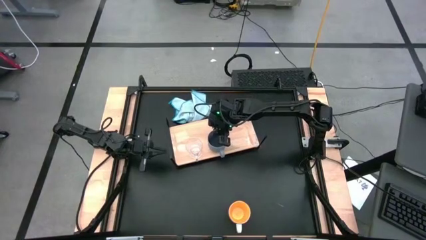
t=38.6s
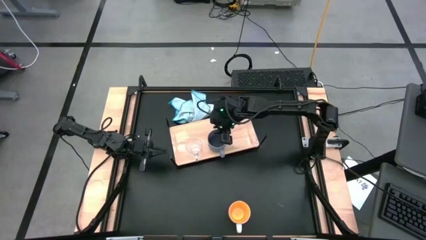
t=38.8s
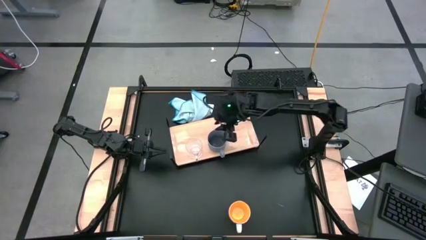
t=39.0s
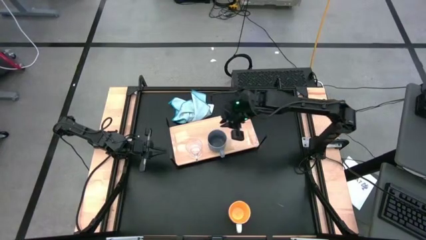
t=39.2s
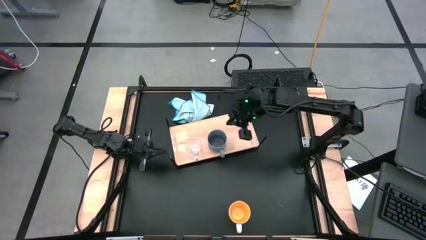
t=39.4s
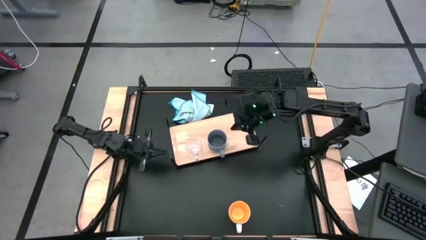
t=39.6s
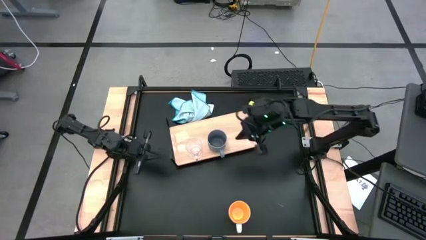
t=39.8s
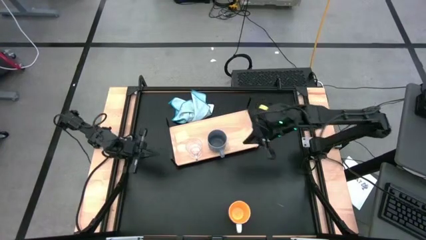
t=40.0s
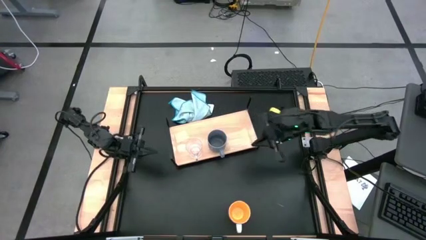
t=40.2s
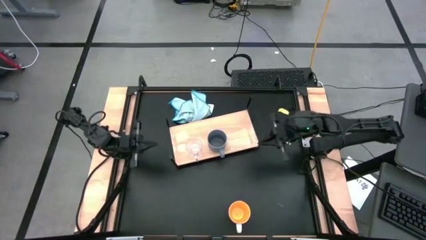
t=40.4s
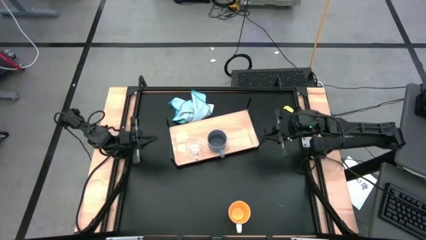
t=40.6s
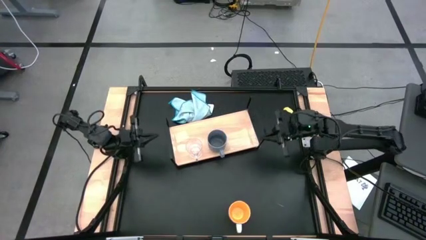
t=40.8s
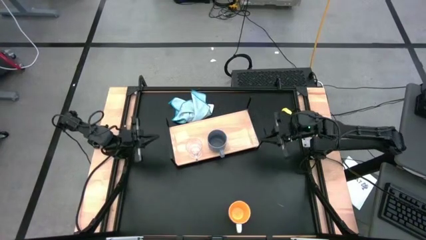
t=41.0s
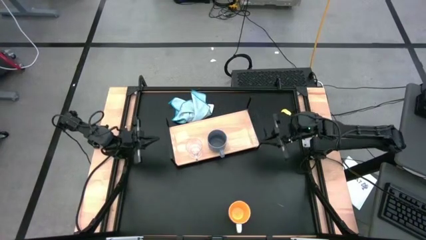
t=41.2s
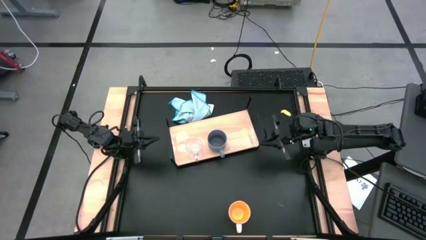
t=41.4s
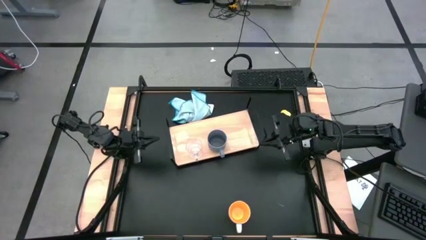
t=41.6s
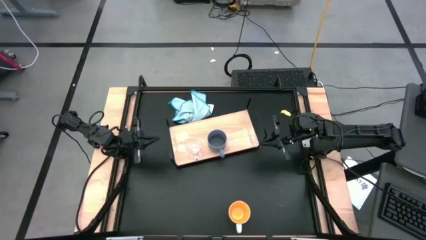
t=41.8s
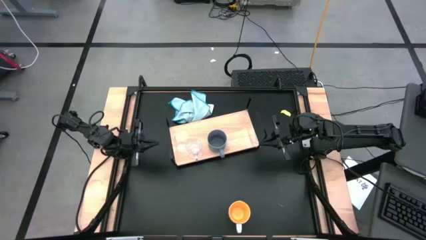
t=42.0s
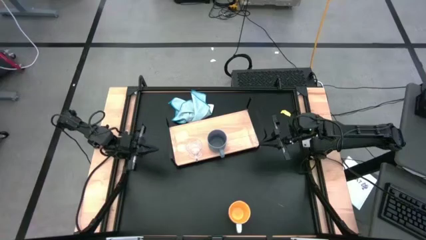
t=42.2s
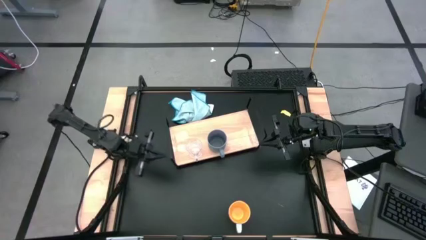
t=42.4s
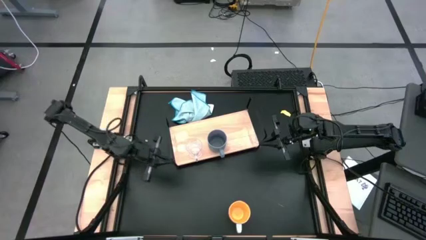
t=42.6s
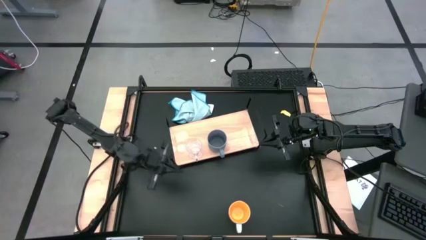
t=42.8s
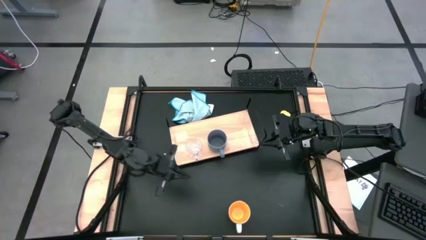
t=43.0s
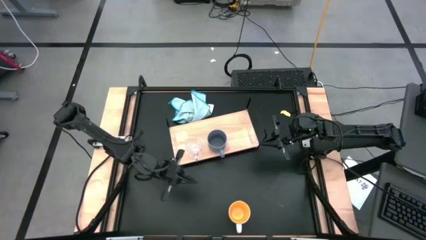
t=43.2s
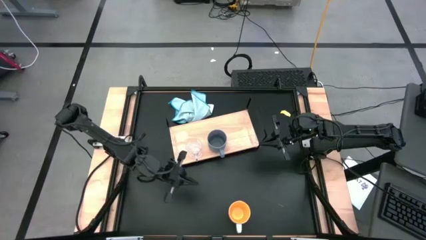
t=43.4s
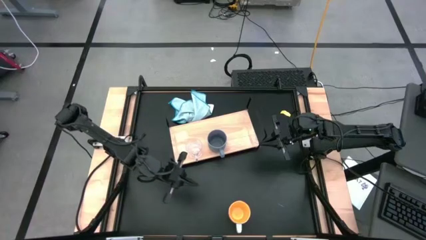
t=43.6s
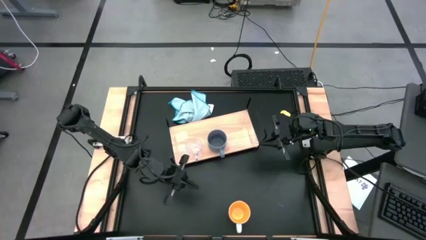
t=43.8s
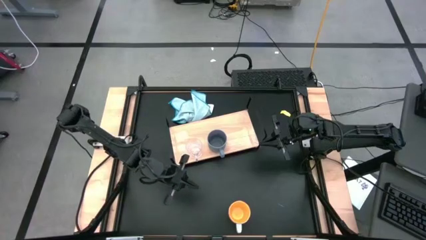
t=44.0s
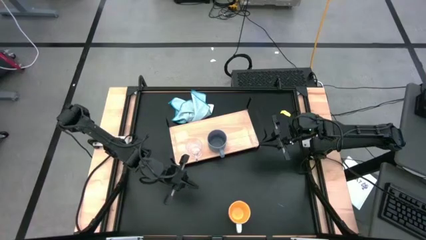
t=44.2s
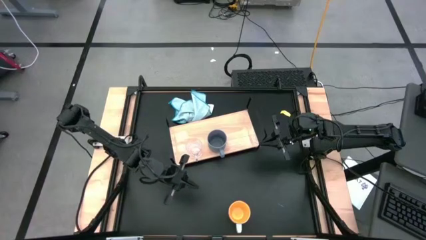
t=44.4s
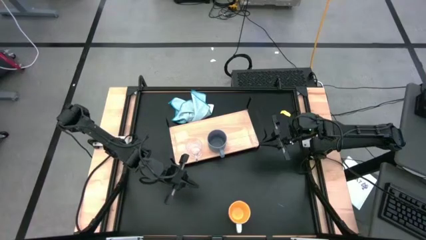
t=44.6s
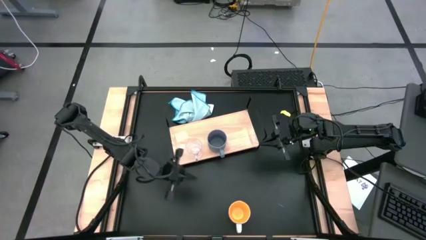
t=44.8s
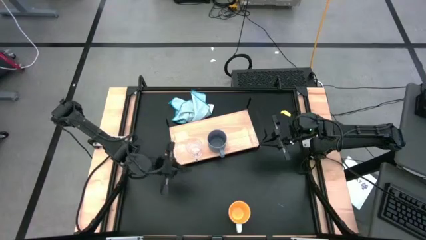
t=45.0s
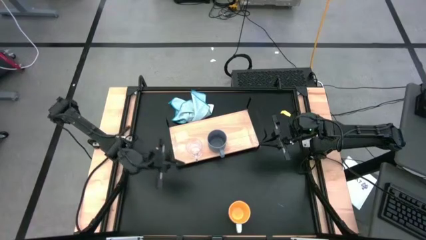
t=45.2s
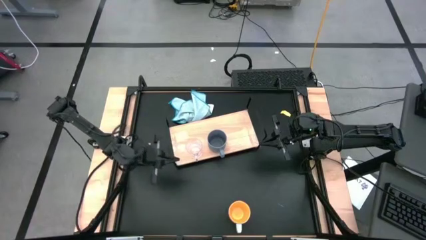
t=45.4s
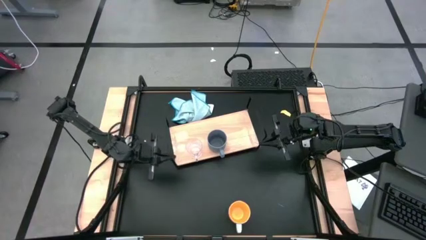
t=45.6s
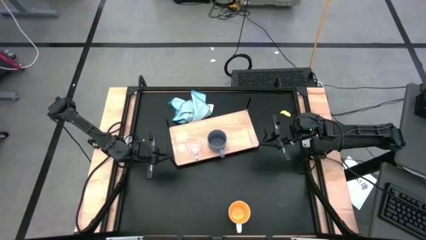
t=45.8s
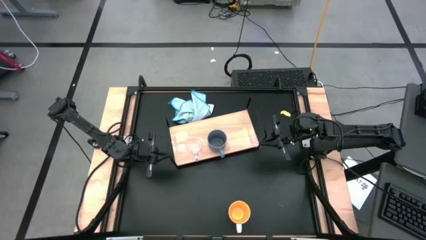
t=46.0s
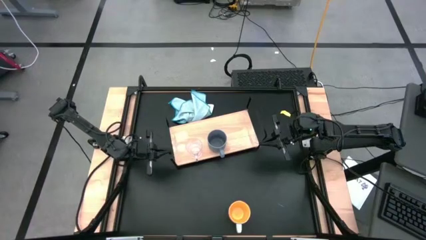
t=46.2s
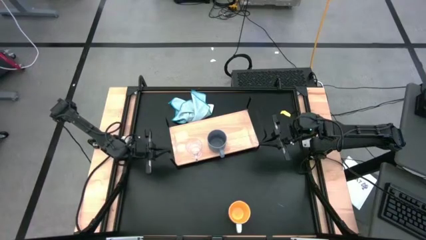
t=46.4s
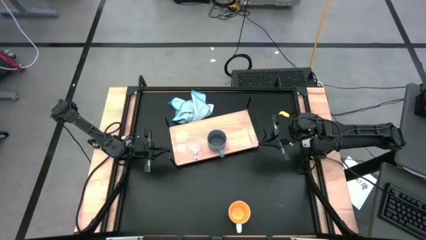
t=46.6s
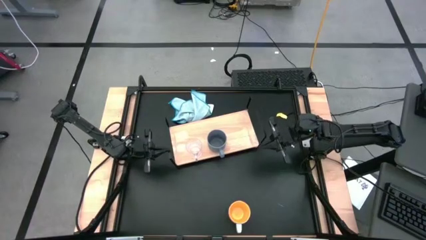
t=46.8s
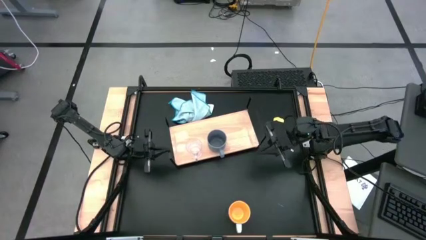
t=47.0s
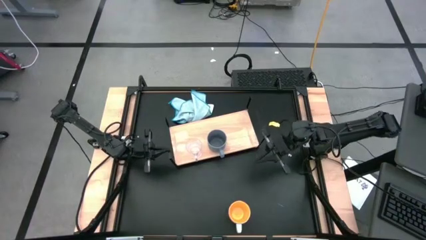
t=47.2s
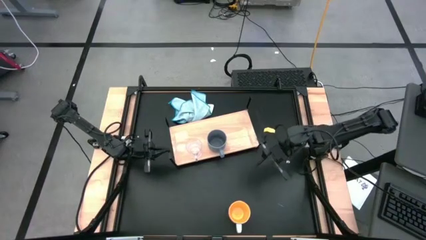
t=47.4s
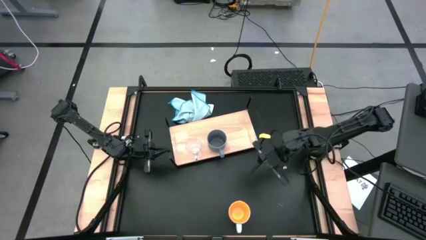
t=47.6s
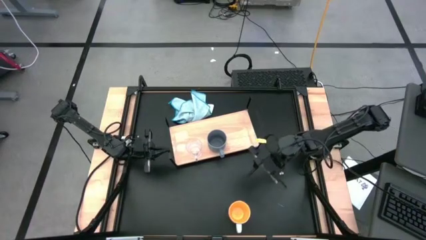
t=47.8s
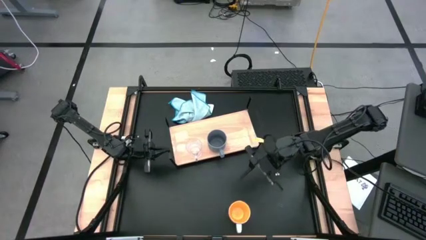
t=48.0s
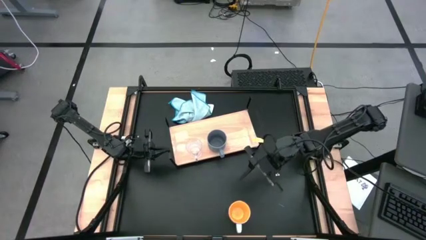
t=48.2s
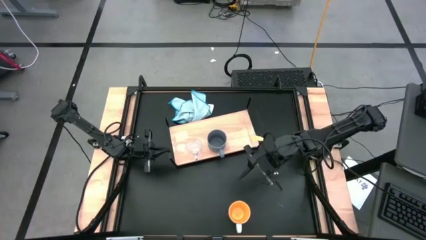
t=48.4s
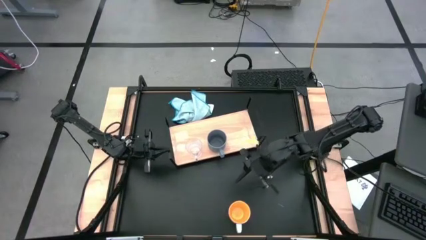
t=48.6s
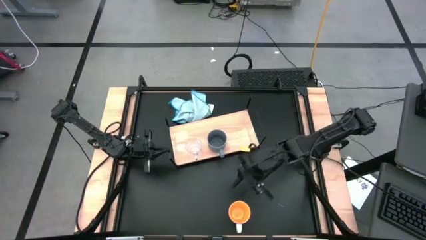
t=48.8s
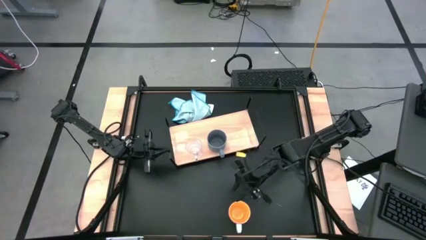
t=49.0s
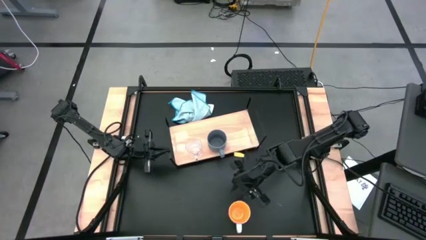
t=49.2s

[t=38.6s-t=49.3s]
Task: Stack small to large cups/mugs on shelf
Put the yellow mug on the shelf

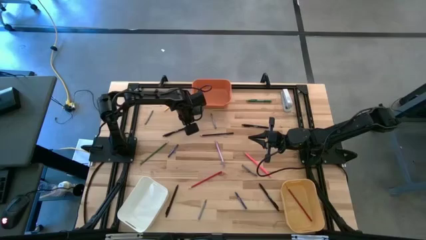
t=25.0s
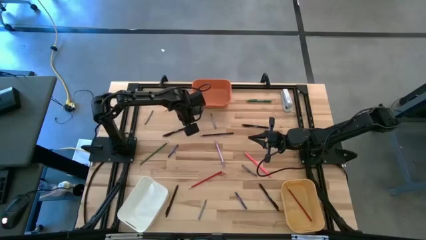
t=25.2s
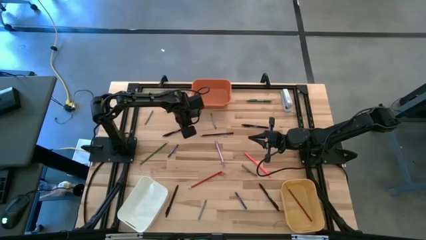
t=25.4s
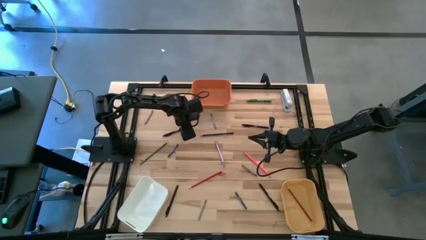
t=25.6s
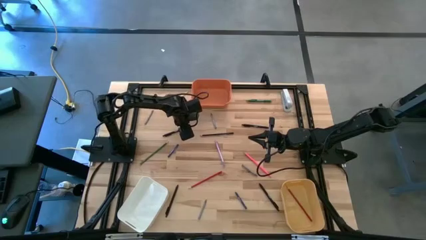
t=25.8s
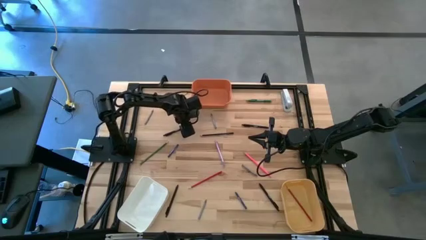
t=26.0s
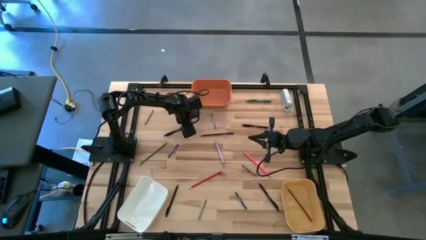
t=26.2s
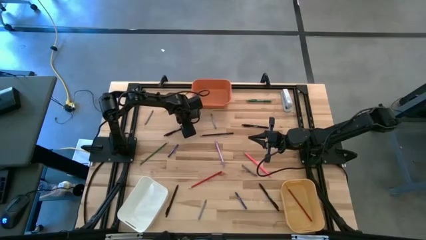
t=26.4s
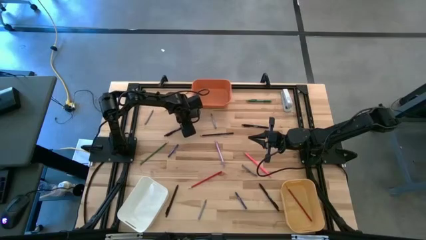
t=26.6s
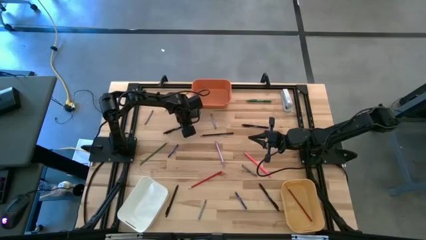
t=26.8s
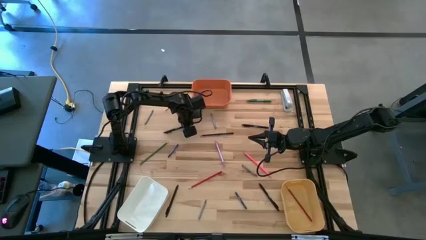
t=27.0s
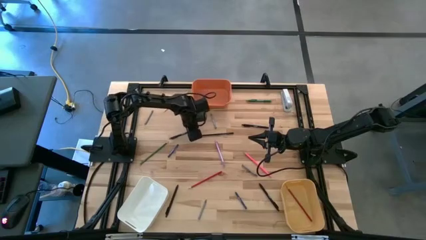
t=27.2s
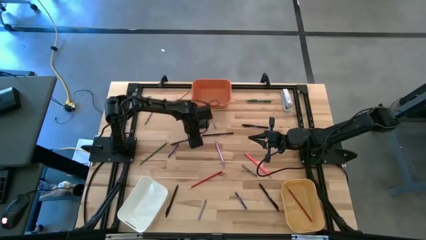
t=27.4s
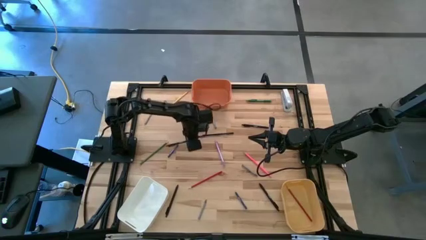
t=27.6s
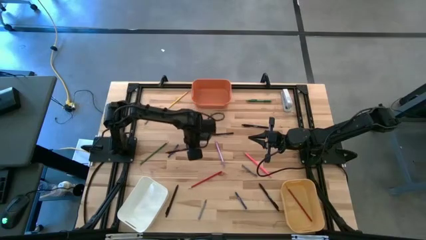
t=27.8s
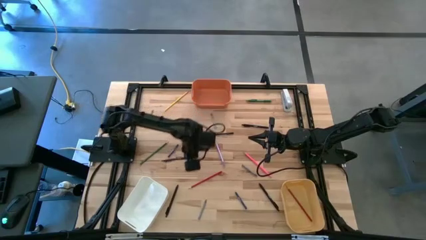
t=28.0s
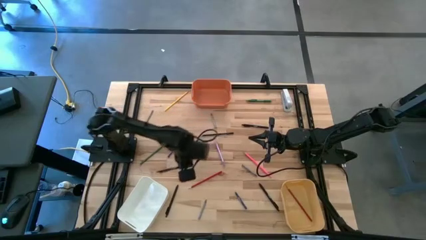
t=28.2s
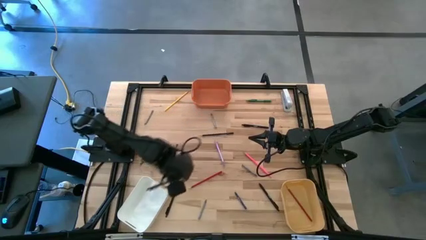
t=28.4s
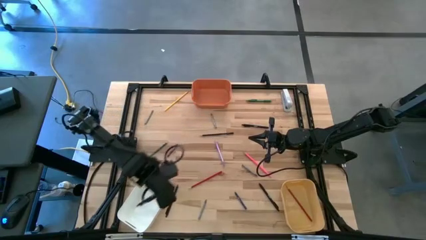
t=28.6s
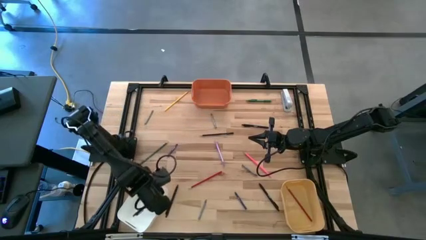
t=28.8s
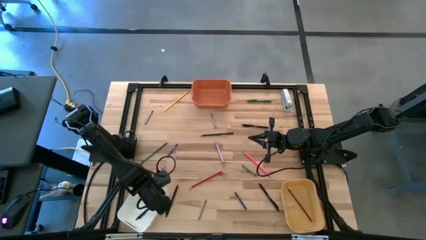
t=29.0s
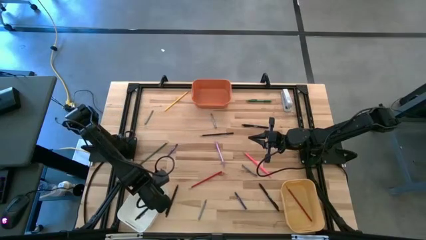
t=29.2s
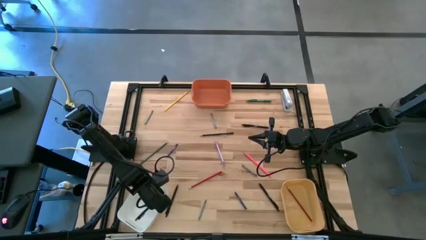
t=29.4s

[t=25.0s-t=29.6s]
Task: Sort crayons/erasers/pens/pencils in bins
Put the black pen into the white bin

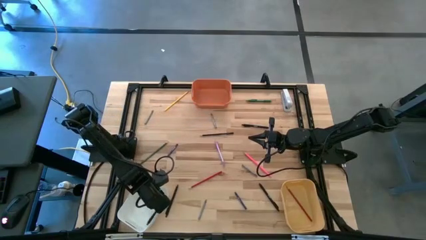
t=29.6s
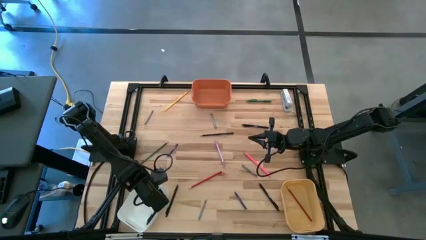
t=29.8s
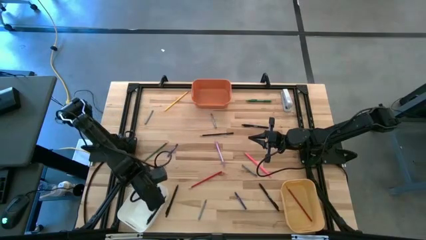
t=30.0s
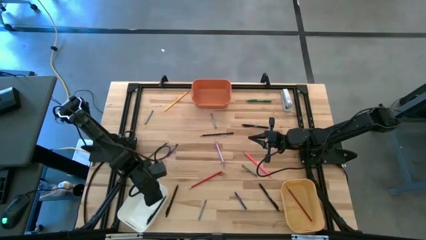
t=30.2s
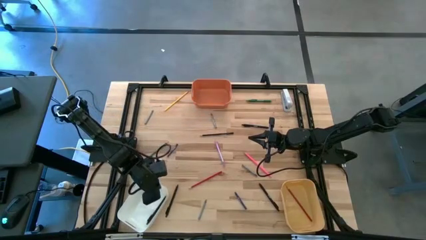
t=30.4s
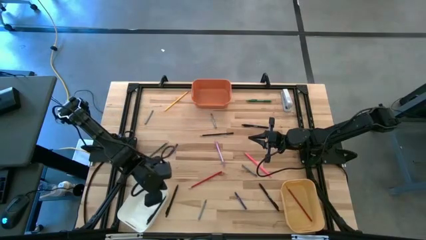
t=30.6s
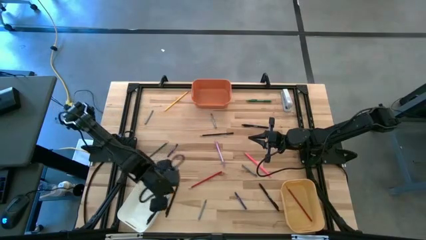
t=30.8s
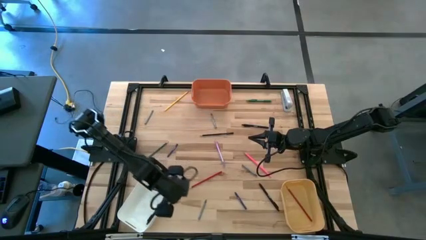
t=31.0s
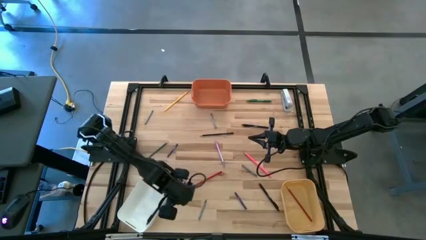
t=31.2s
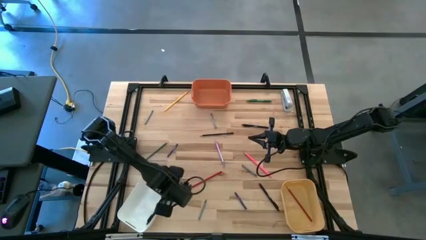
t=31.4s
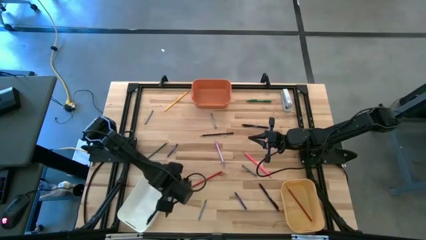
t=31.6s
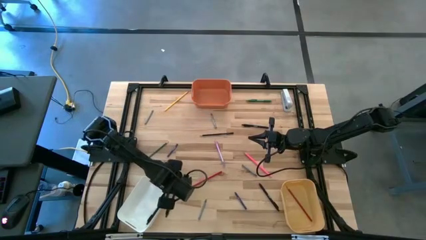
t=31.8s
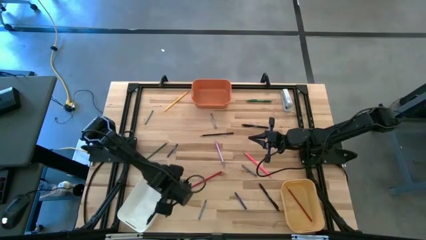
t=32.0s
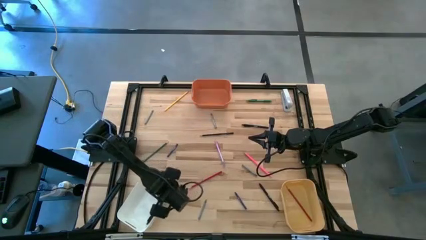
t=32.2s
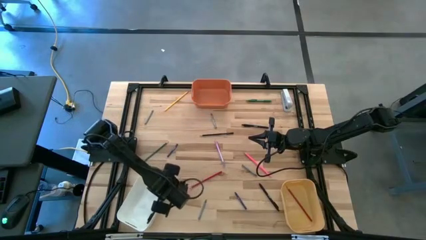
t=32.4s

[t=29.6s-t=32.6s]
Adjust the white bin
